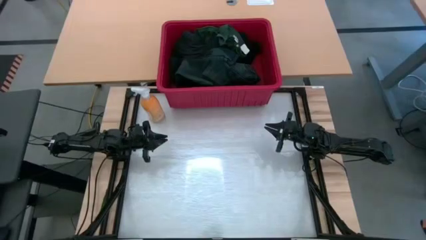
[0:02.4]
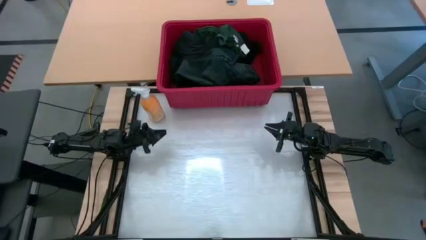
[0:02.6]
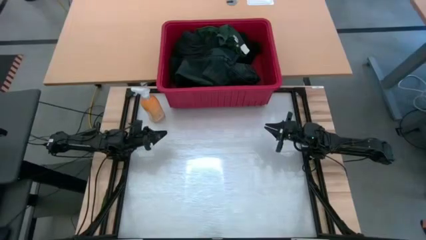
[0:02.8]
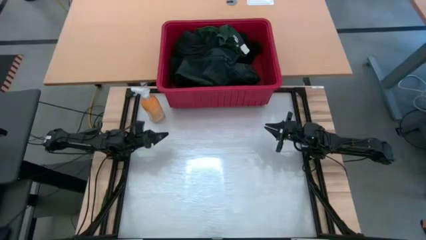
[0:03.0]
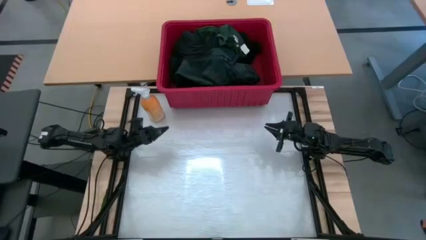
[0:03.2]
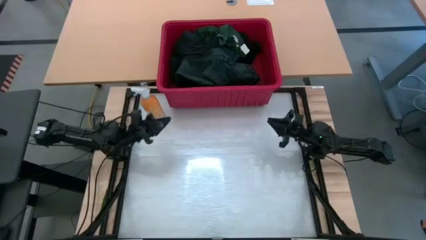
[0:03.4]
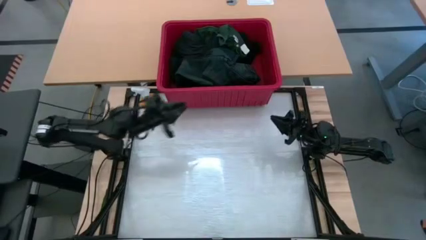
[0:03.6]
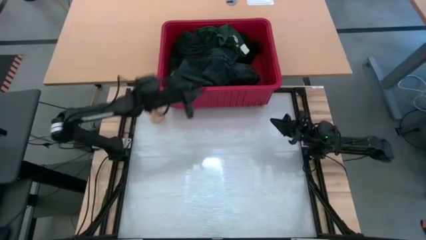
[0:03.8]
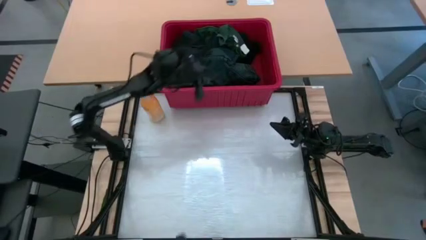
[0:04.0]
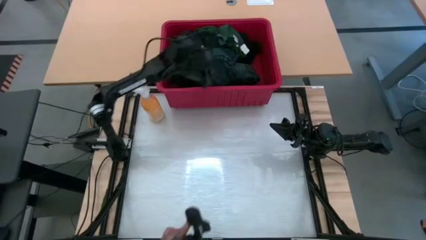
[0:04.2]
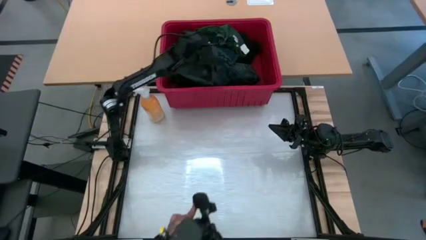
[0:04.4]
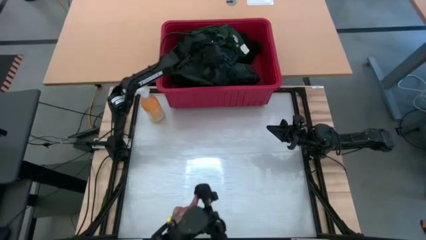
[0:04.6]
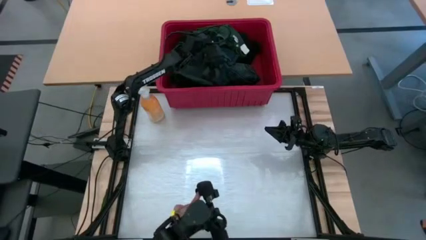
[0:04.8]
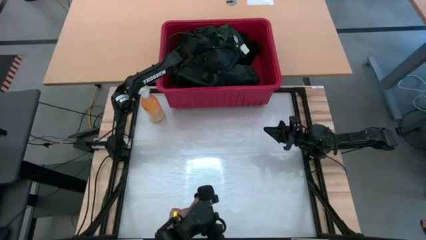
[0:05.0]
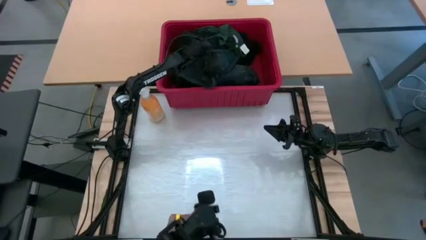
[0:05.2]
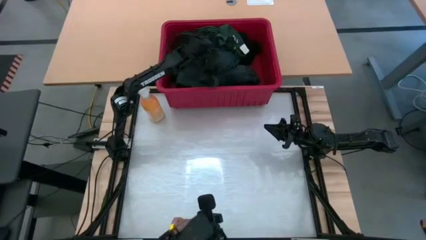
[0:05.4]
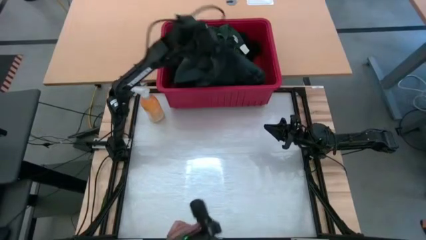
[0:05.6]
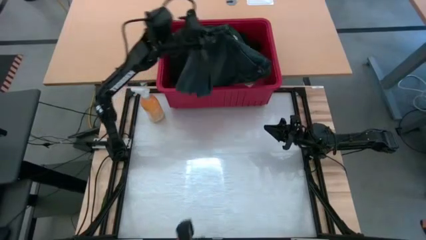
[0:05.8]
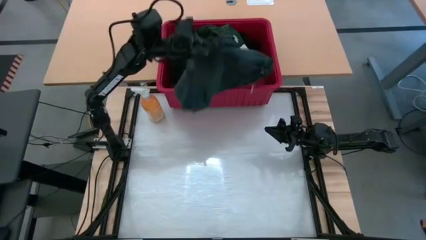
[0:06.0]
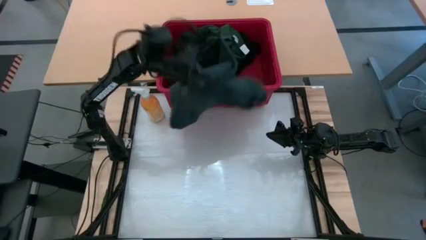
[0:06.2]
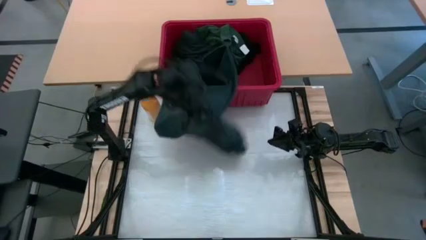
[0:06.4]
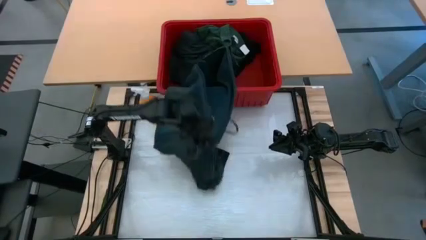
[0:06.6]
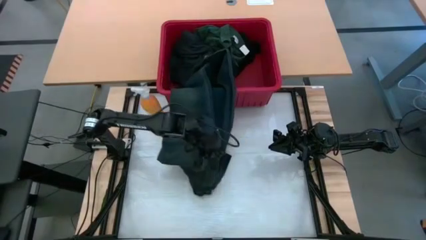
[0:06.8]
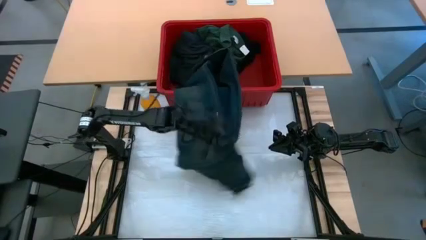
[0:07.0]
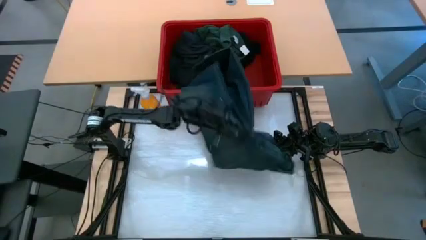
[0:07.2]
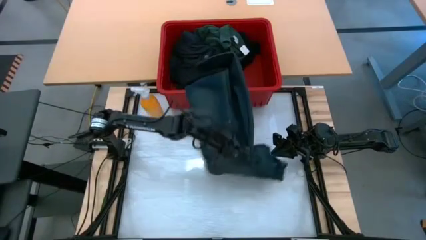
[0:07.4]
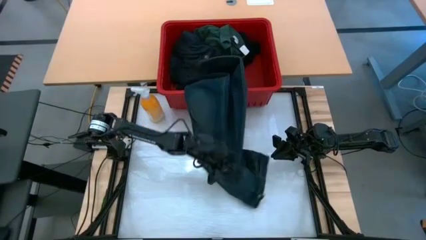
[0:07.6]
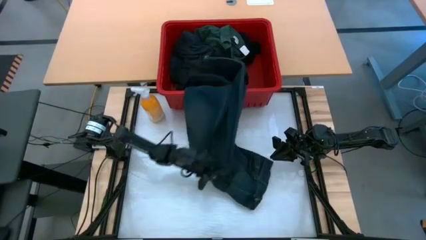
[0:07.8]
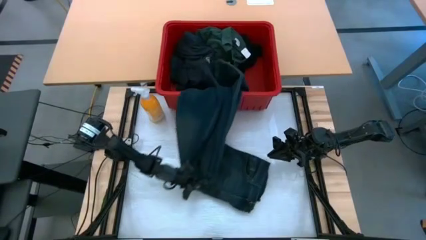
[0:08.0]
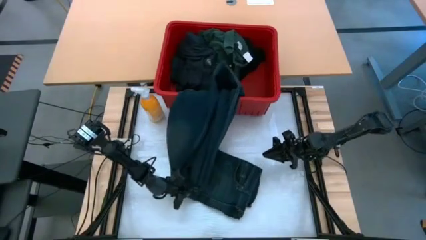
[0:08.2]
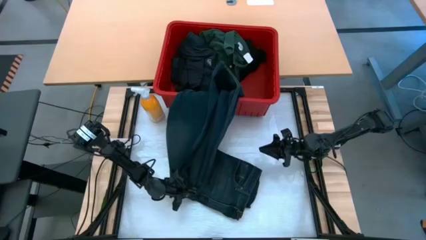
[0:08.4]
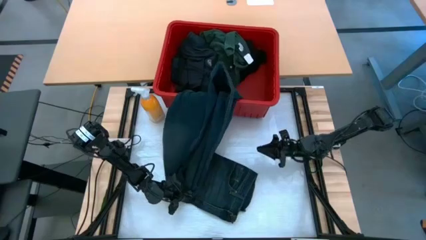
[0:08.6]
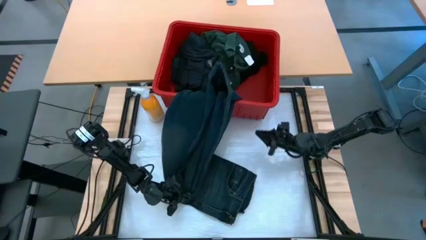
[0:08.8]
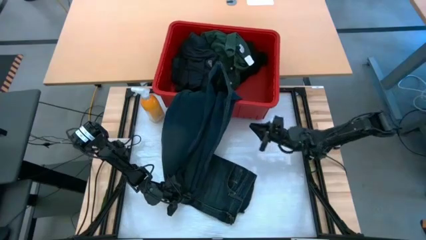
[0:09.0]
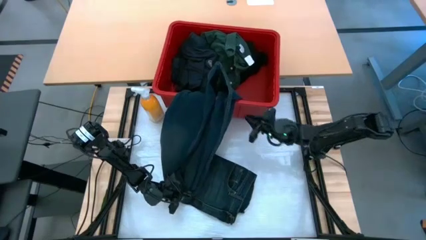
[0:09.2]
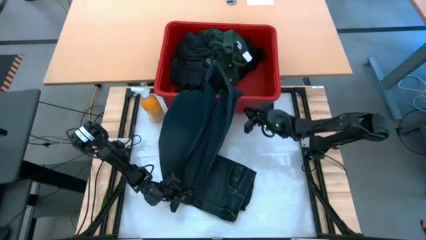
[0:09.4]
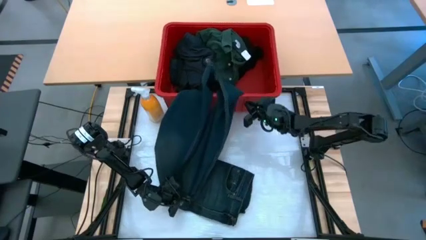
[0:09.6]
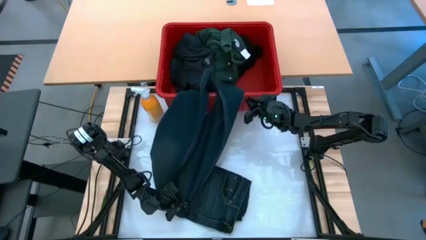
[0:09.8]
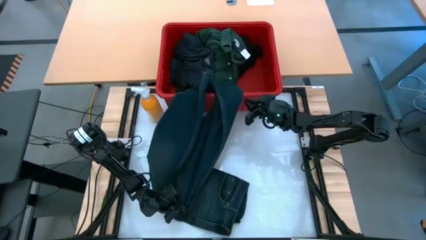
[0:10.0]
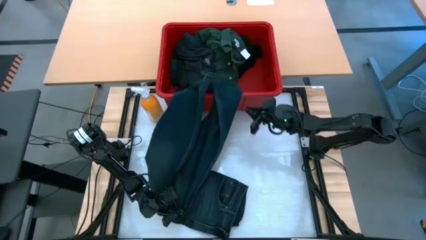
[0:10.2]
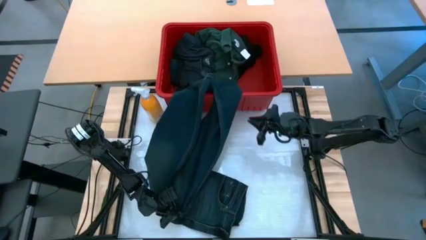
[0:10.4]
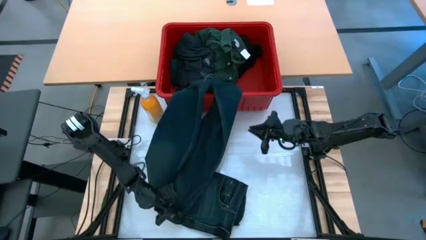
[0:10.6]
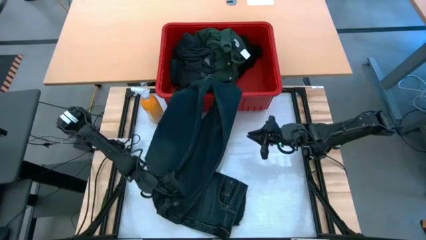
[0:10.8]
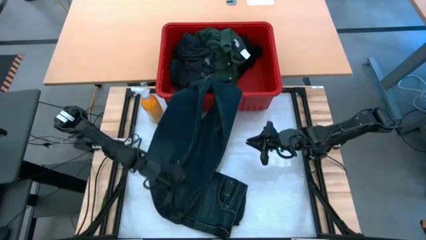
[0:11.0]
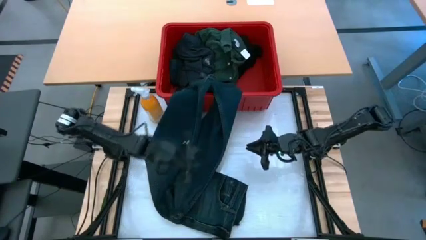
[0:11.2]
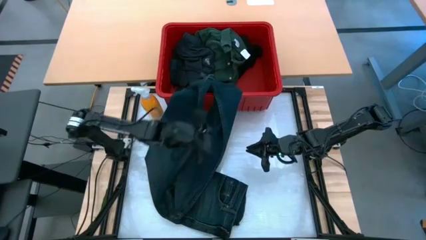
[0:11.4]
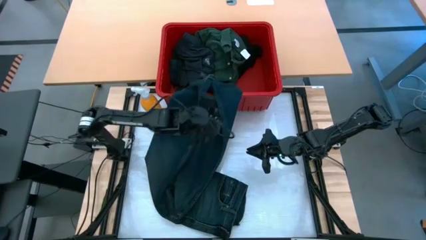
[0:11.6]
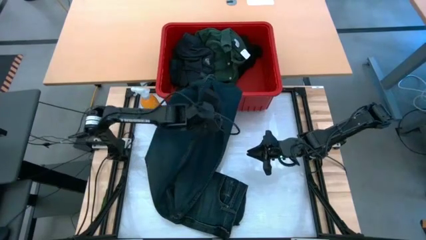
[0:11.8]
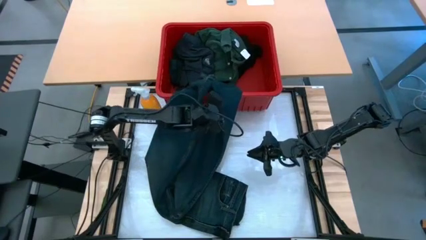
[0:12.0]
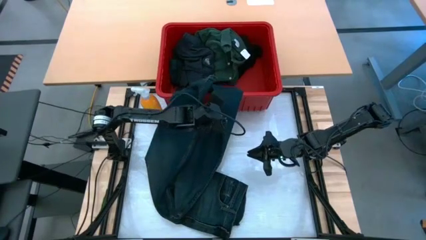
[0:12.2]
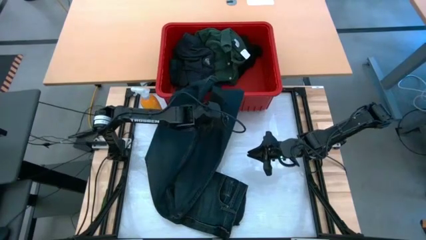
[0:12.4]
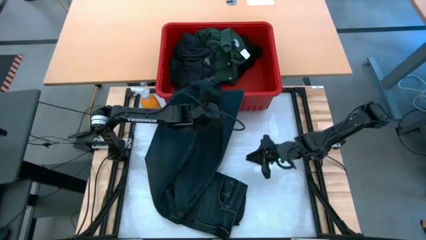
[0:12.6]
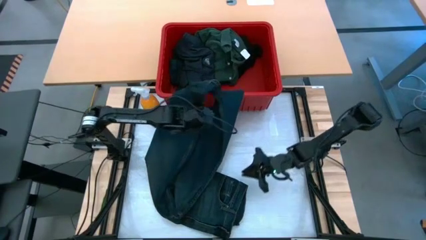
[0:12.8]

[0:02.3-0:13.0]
Task: Fold laundry
Remove the blue pants from the red bin

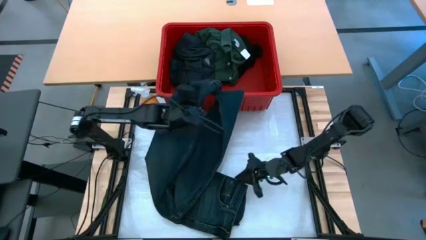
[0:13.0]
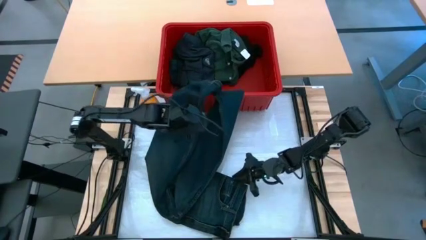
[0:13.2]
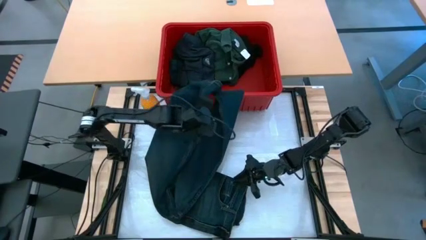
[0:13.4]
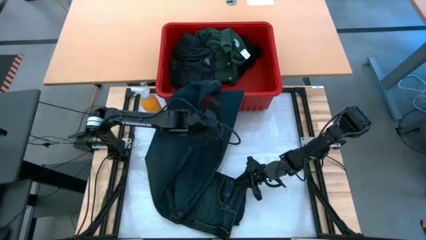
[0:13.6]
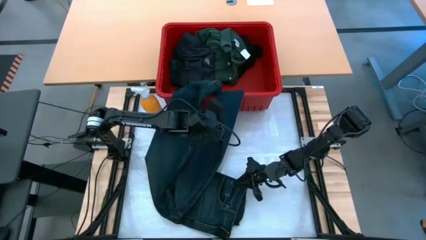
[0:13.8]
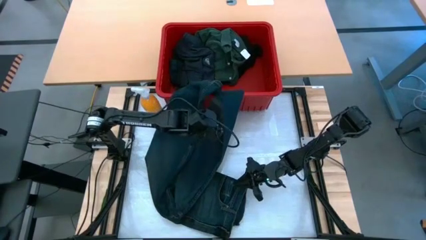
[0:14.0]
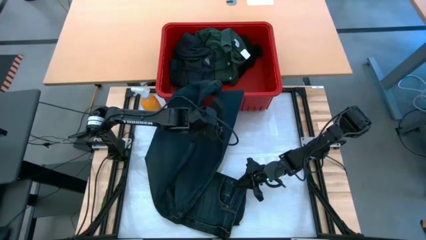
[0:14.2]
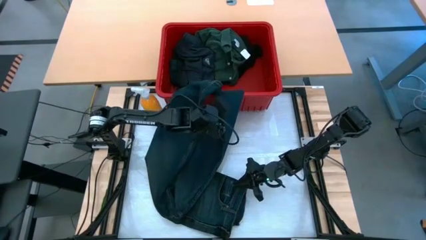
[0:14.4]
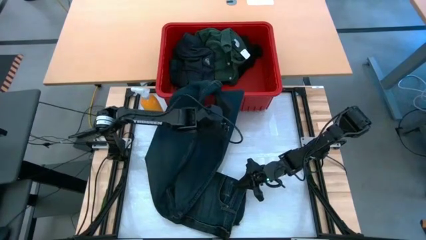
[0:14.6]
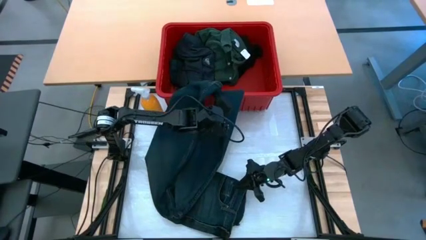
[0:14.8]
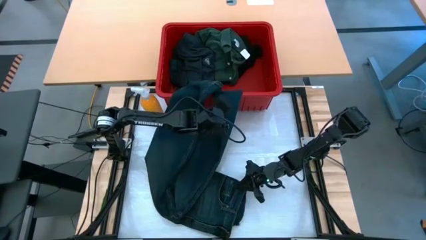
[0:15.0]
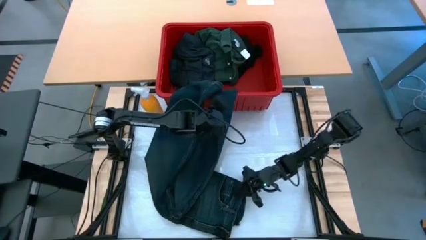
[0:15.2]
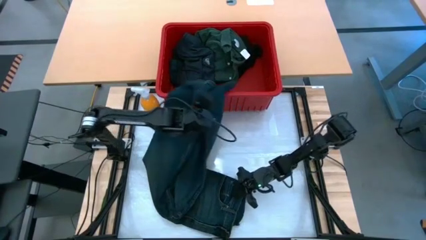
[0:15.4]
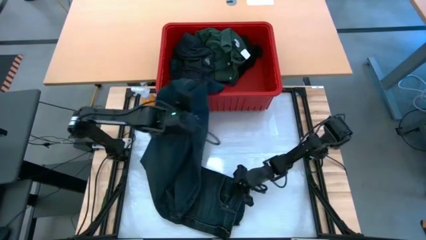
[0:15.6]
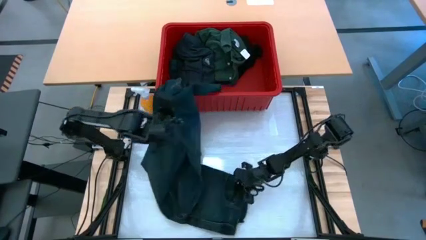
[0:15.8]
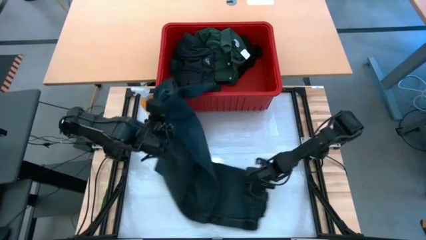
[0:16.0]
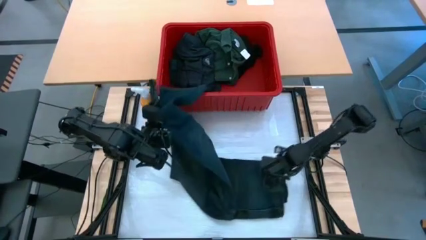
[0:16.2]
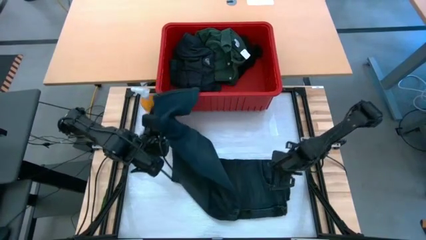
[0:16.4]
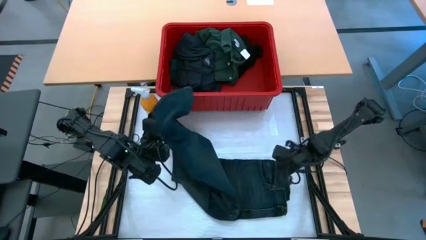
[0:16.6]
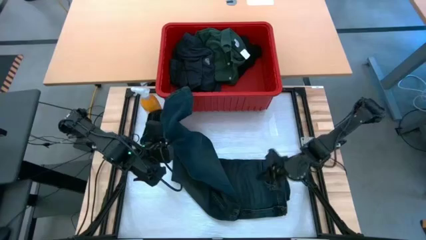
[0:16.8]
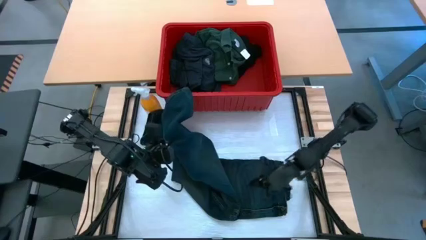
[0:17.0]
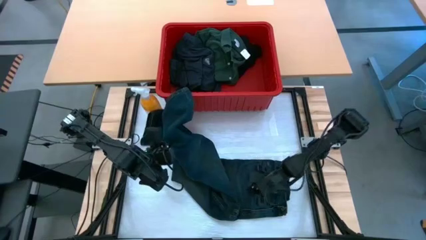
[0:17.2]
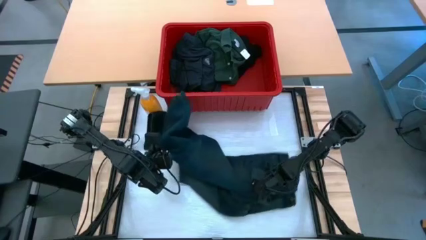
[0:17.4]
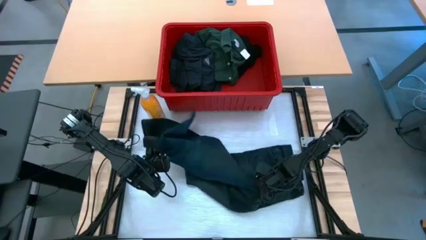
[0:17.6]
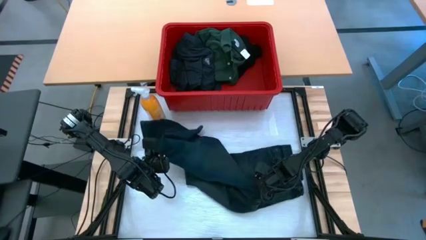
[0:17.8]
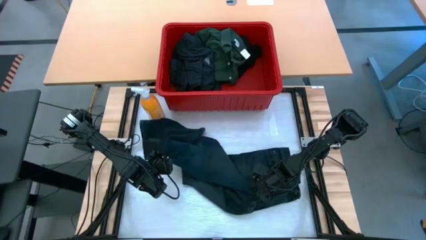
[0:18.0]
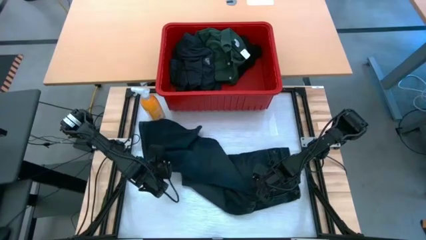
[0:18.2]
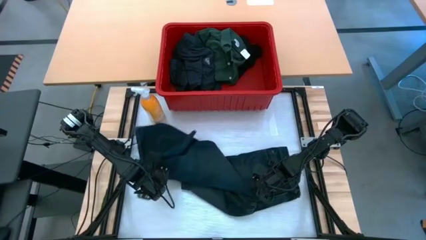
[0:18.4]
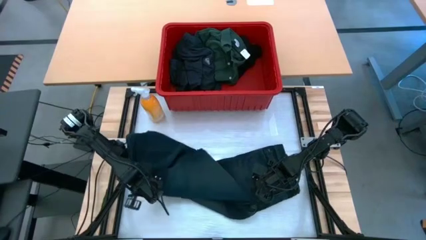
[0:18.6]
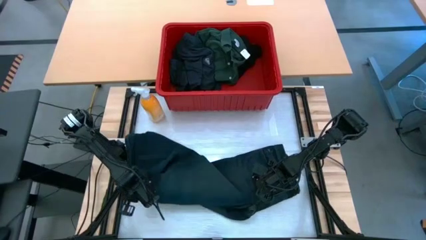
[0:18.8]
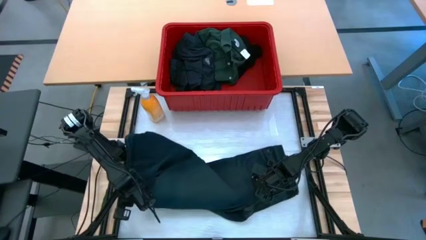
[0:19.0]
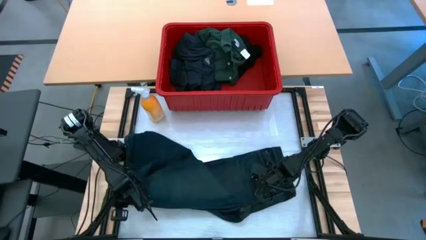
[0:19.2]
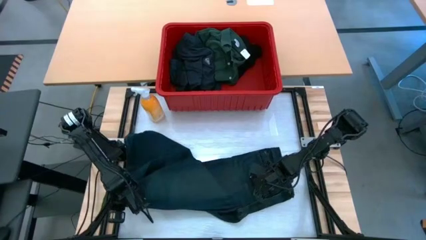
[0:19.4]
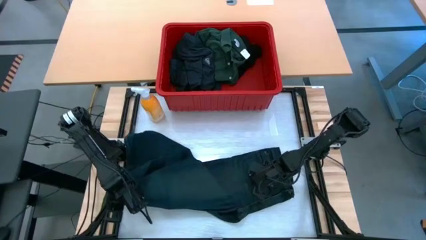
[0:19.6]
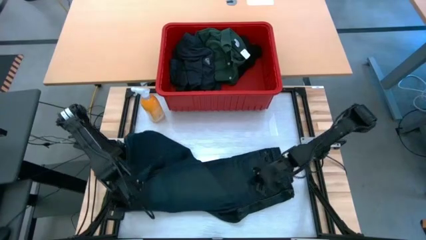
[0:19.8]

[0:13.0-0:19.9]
Remove the blue pants from the red bin
